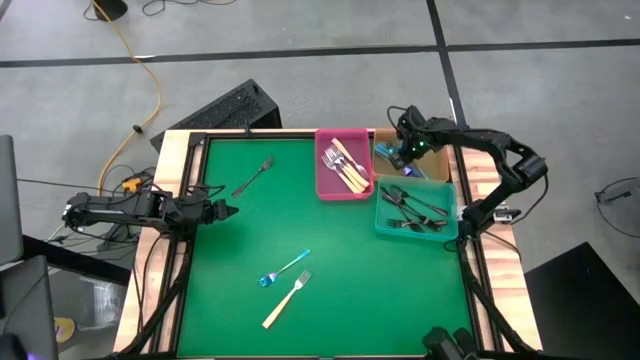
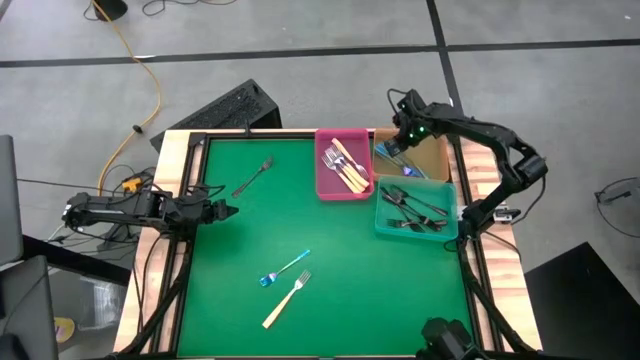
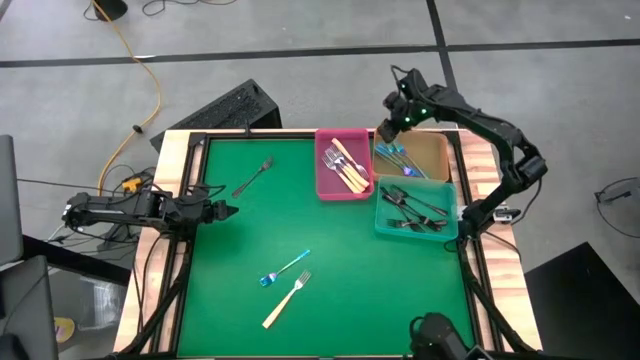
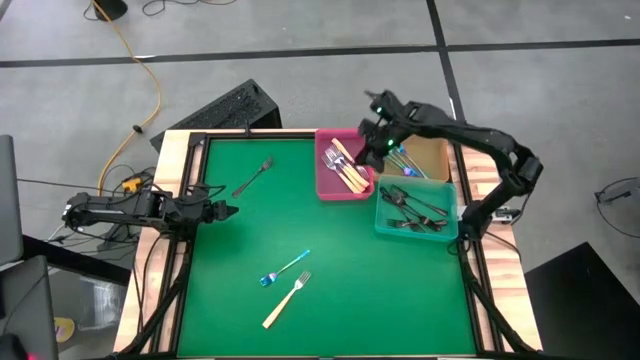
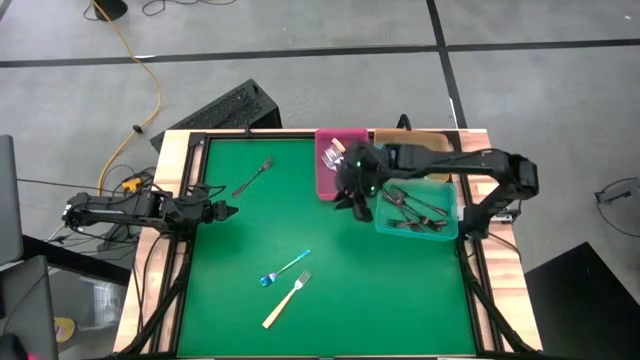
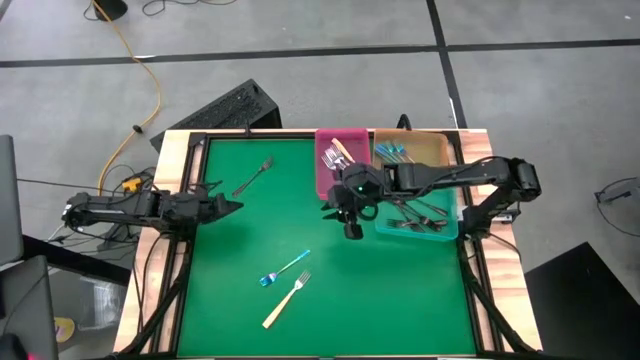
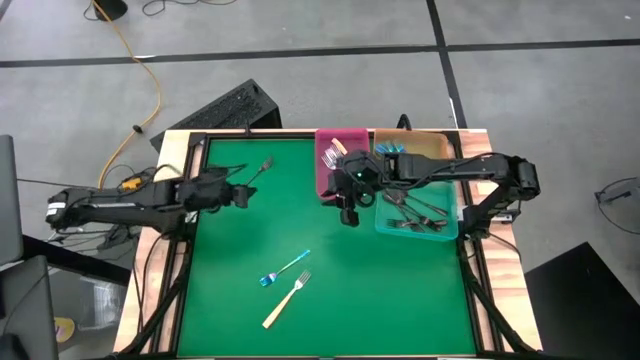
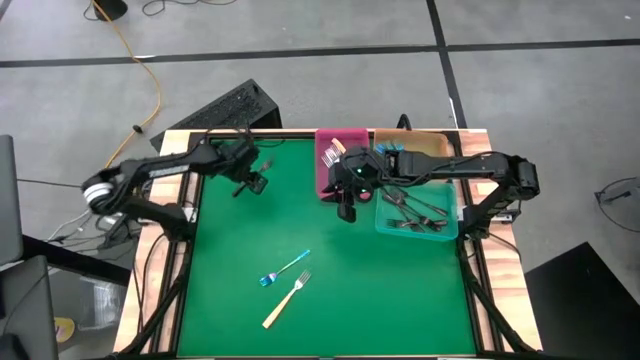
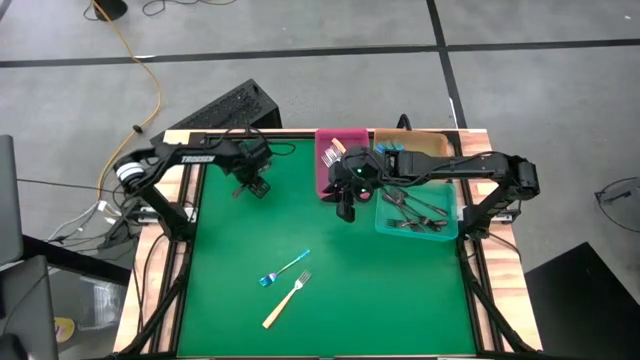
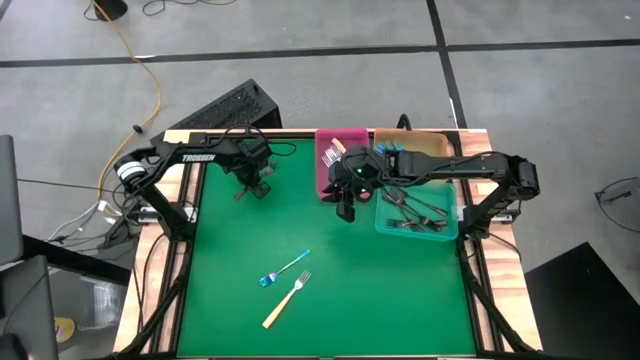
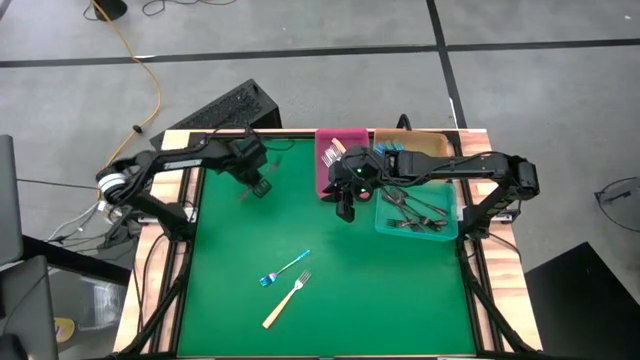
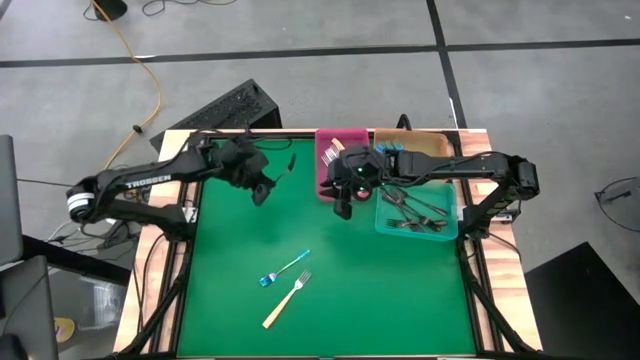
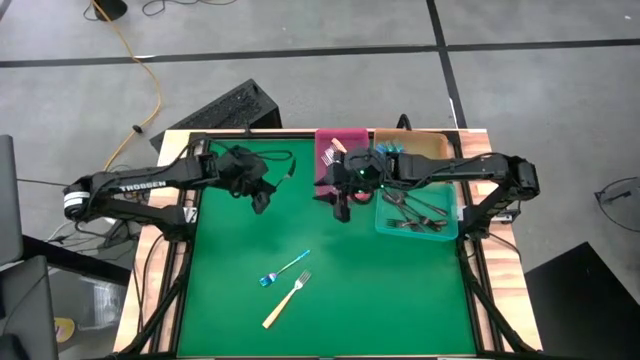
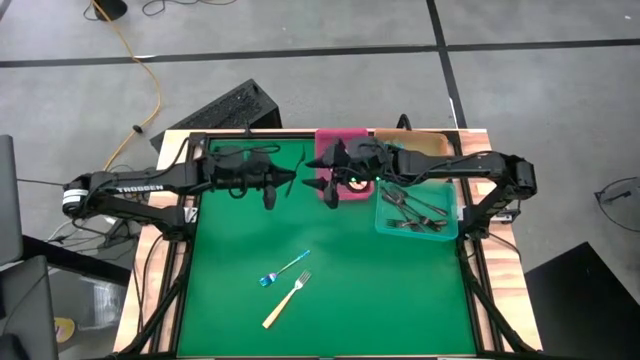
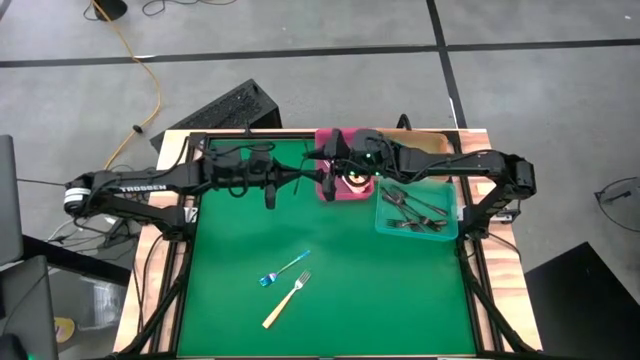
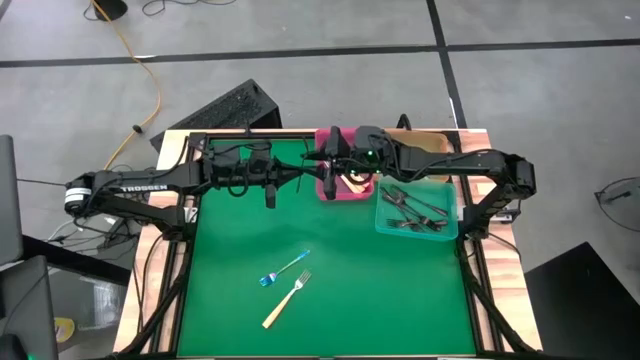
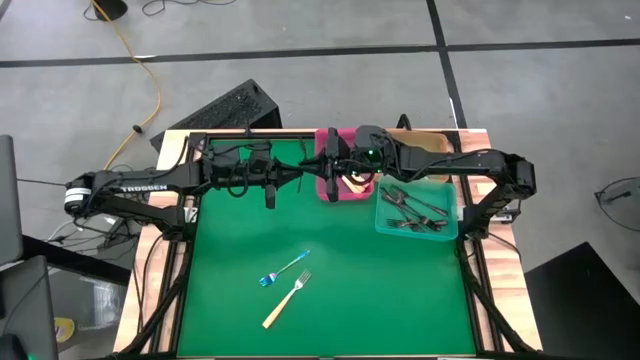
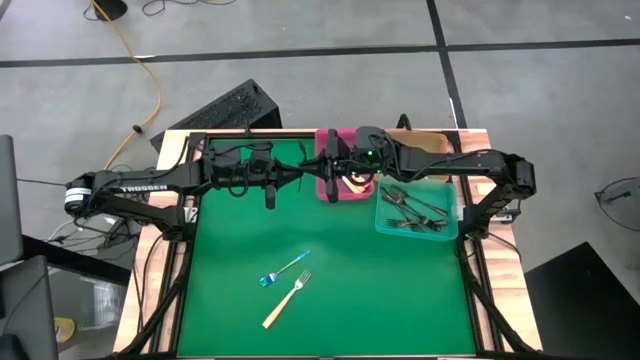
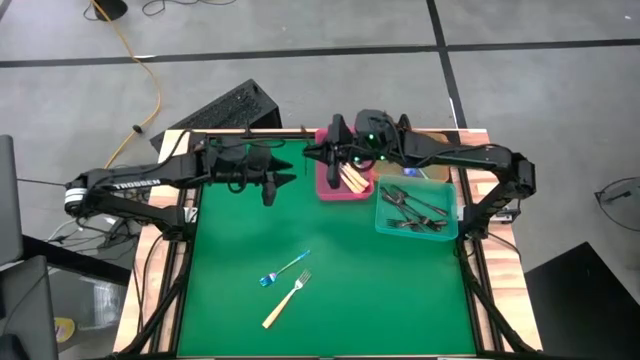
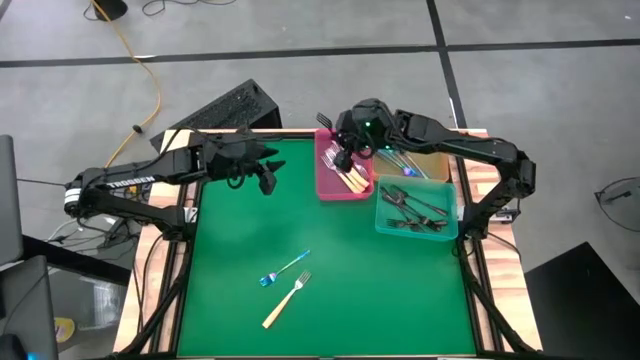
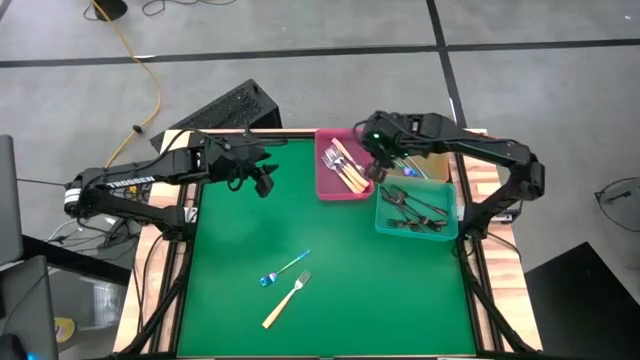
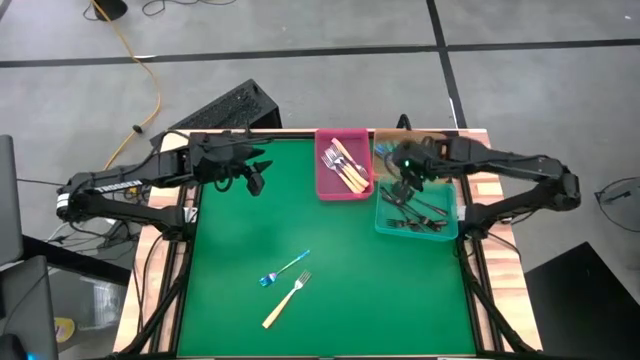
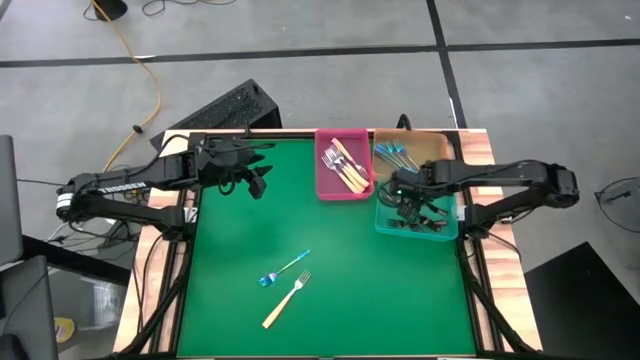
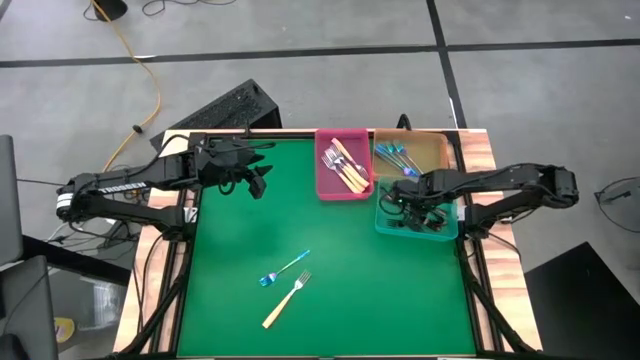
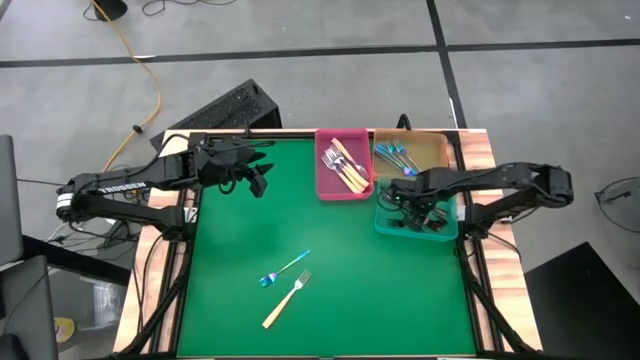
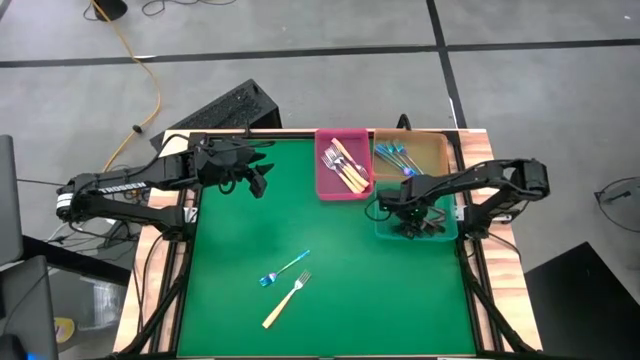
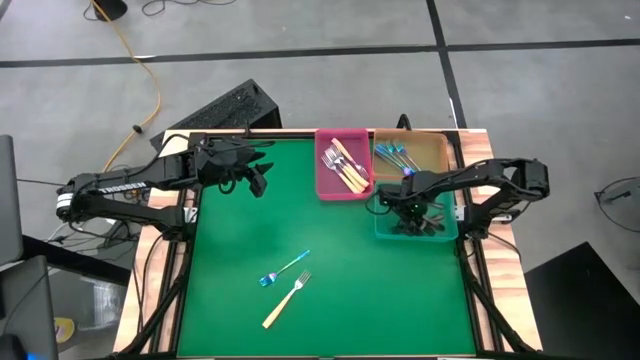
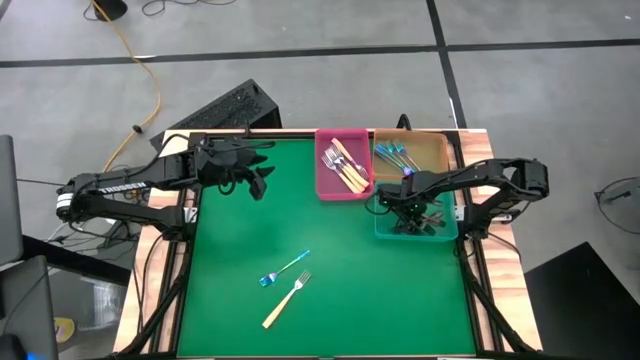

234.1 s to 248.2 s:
Task: Sort silverware by color (type)
Put the black fork into the blue bin

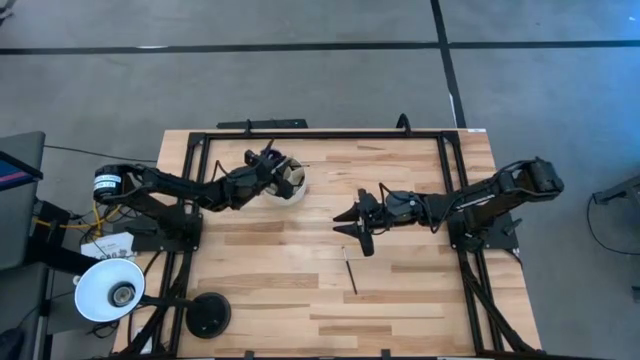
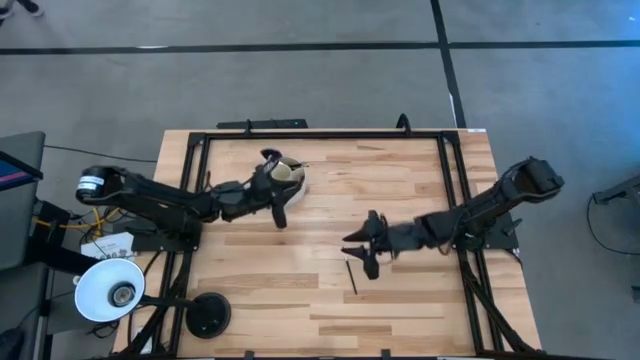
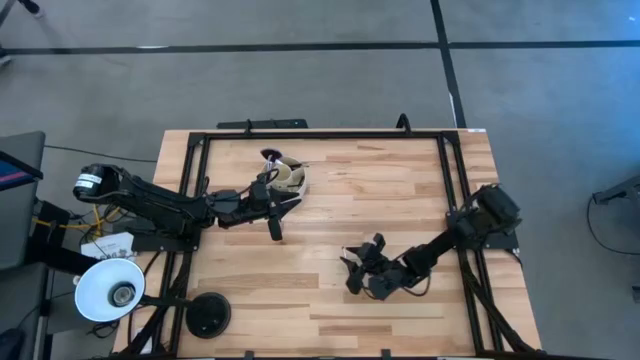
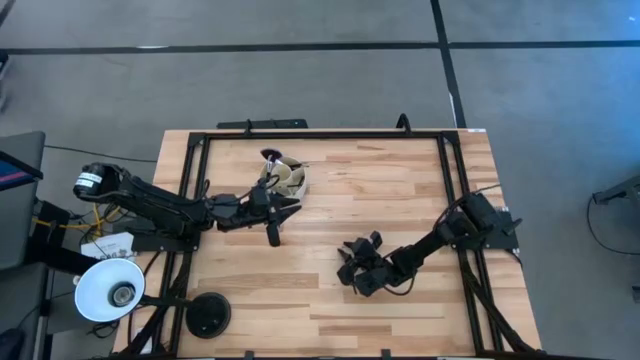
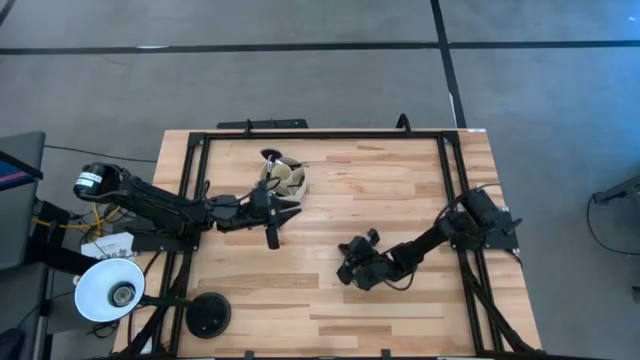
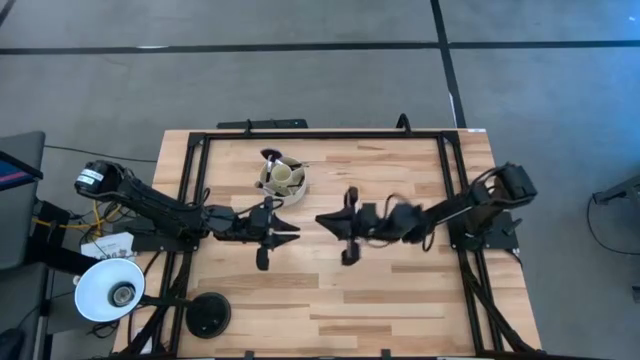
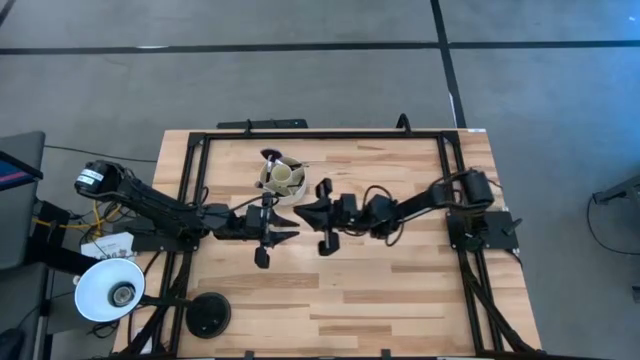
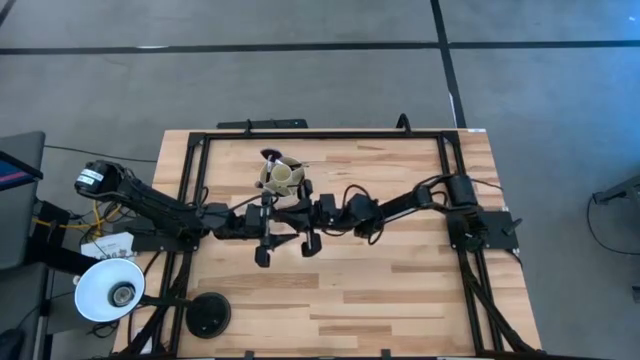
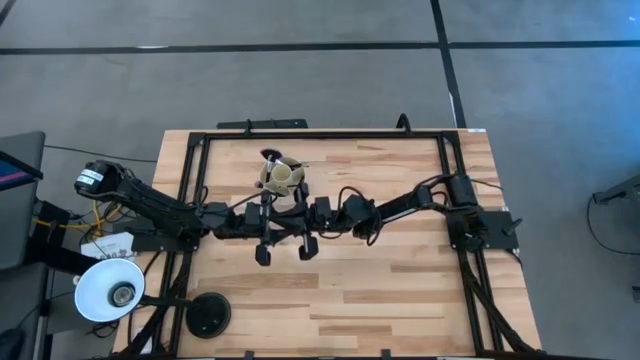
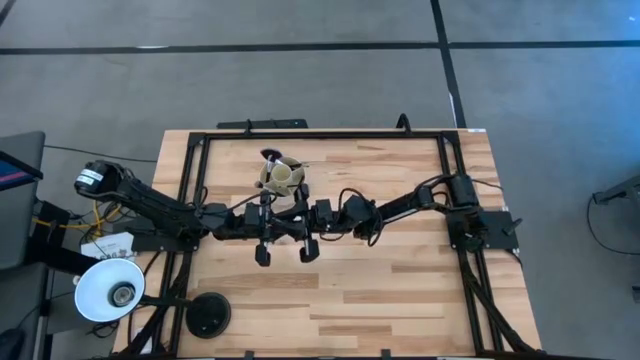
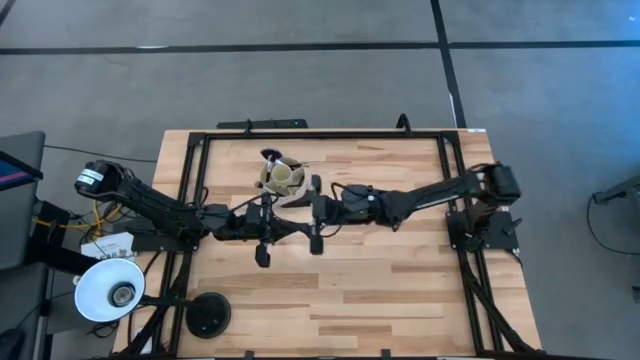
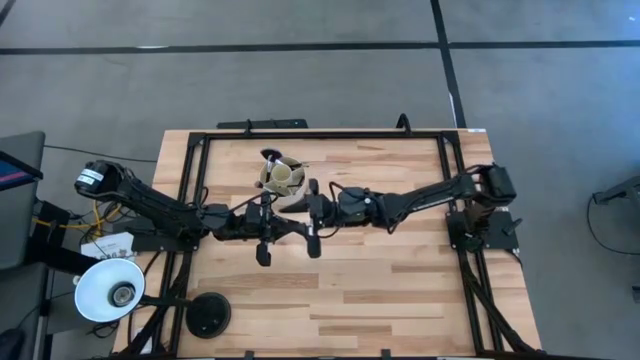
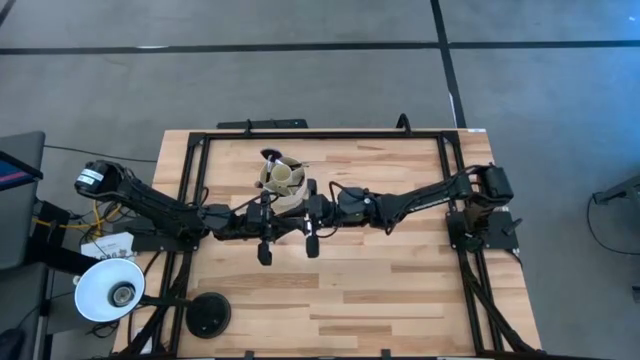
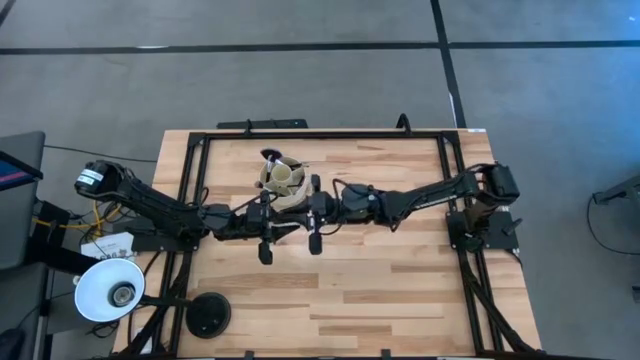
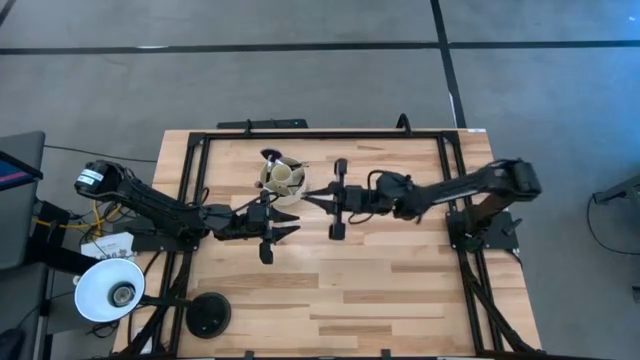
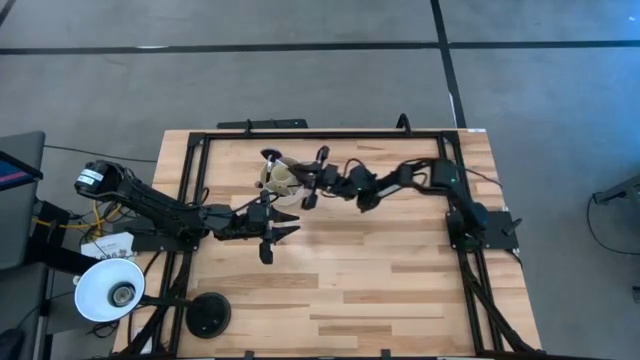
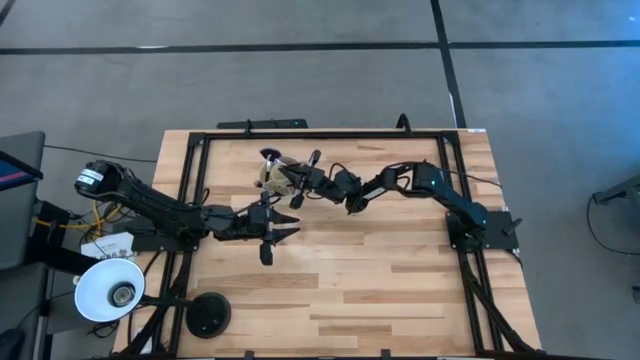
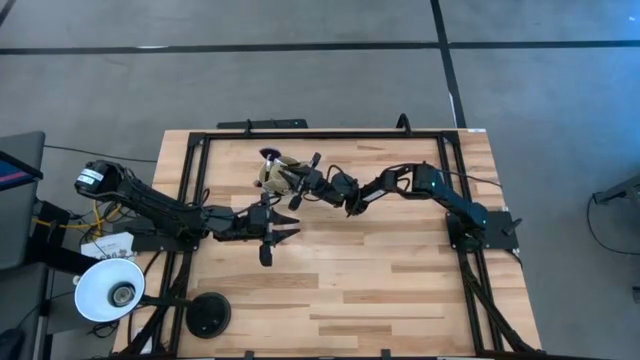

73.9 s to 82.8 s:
Task: Sort items
Put the small black brush in the white organizer
